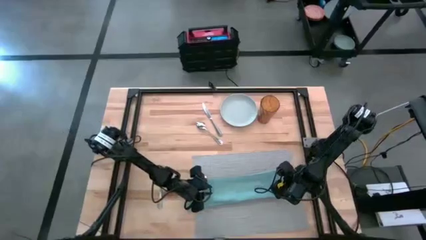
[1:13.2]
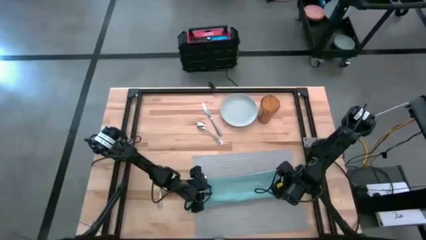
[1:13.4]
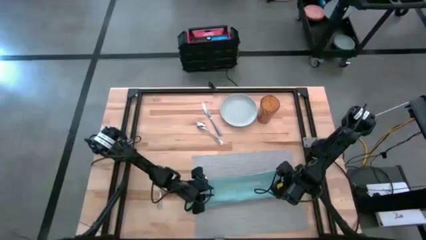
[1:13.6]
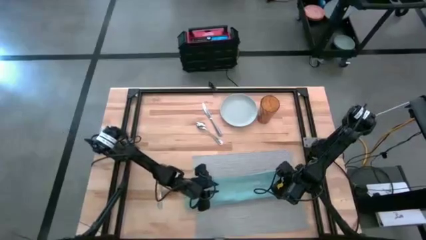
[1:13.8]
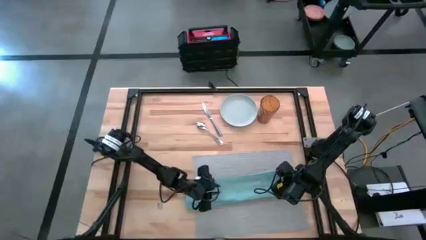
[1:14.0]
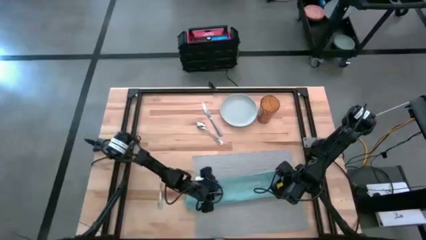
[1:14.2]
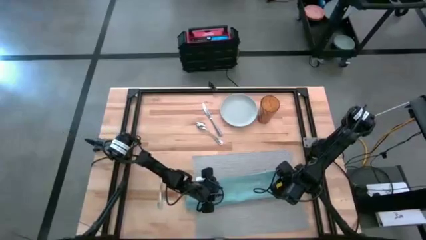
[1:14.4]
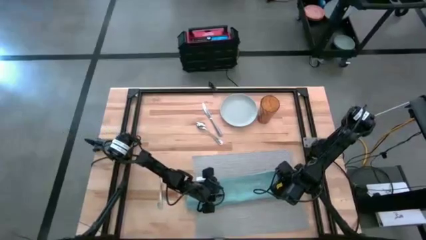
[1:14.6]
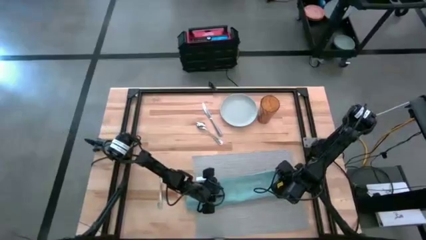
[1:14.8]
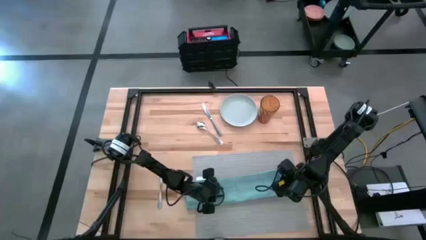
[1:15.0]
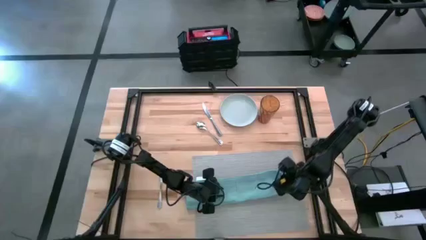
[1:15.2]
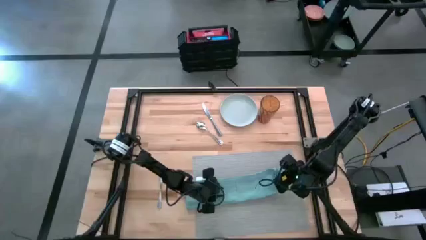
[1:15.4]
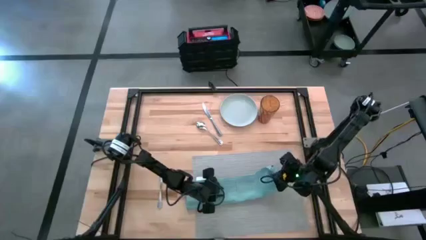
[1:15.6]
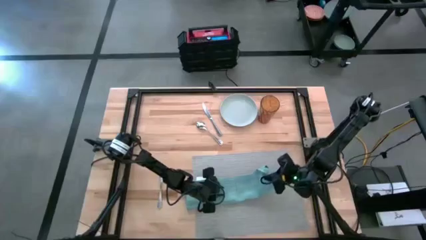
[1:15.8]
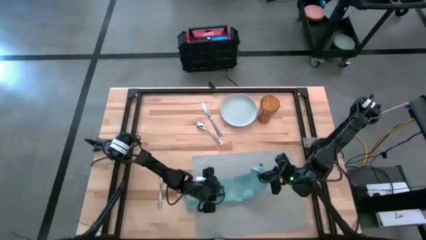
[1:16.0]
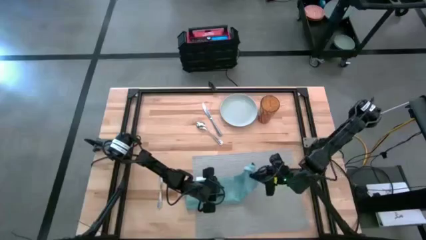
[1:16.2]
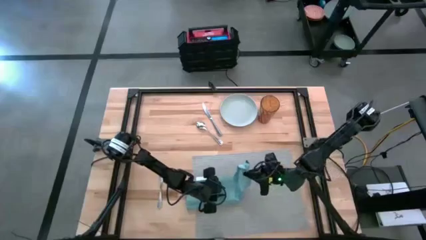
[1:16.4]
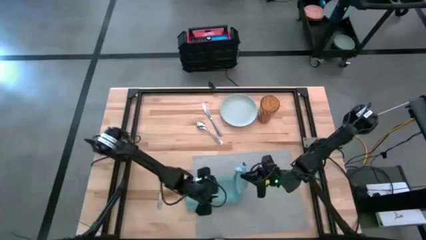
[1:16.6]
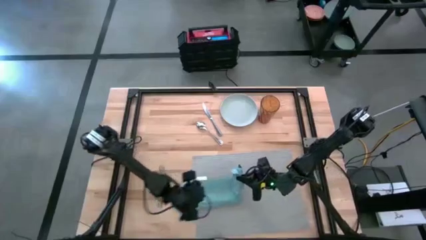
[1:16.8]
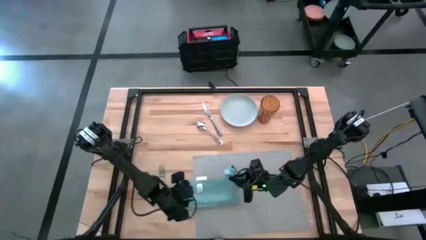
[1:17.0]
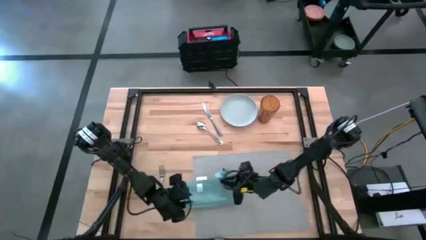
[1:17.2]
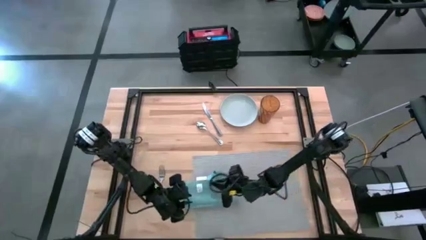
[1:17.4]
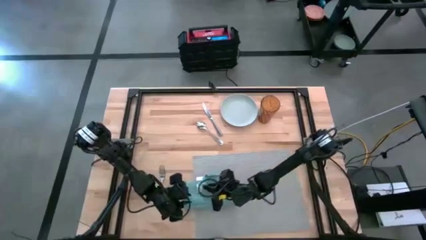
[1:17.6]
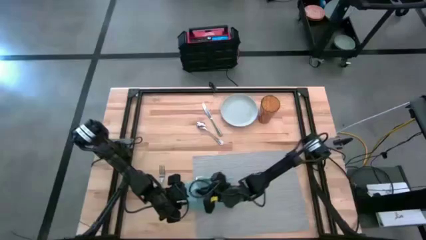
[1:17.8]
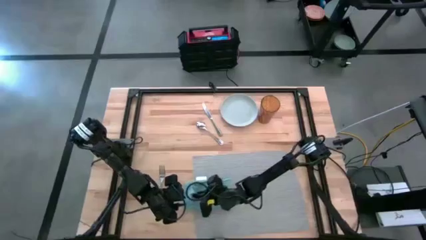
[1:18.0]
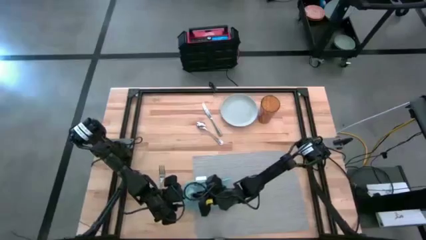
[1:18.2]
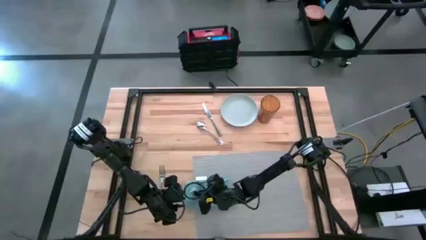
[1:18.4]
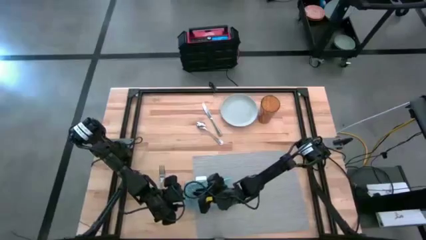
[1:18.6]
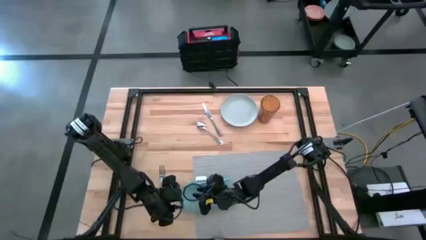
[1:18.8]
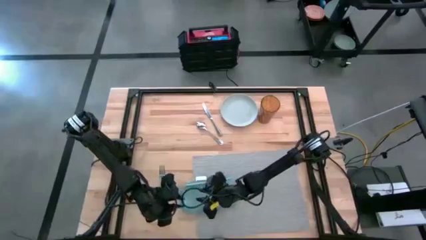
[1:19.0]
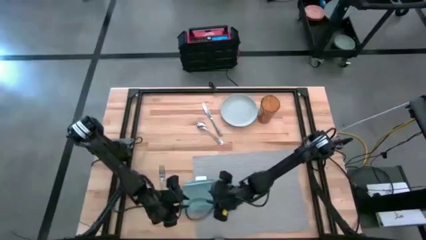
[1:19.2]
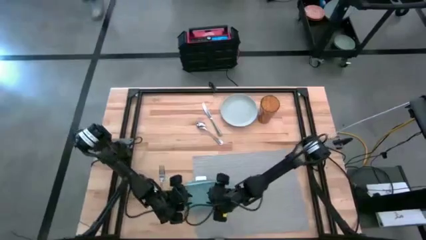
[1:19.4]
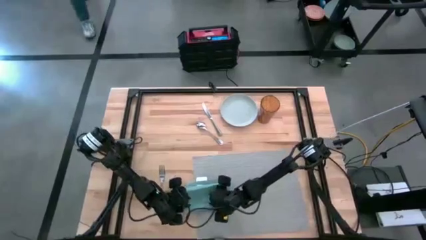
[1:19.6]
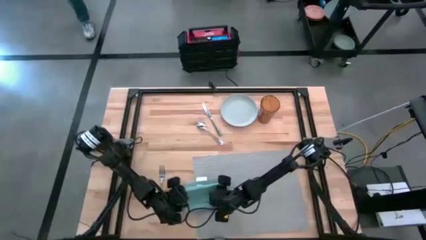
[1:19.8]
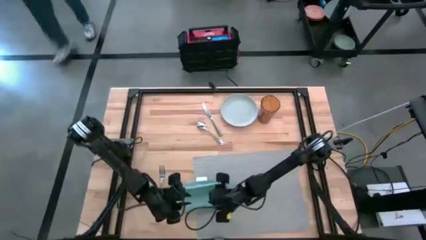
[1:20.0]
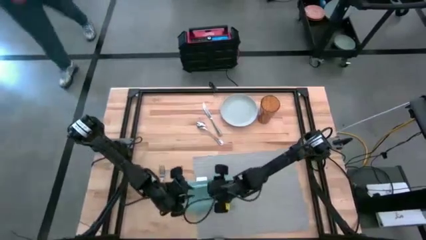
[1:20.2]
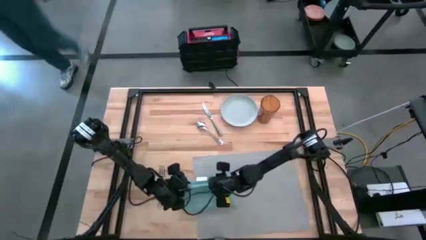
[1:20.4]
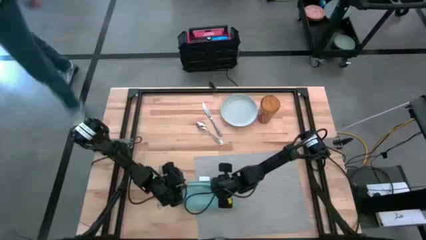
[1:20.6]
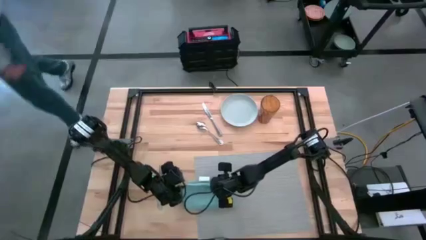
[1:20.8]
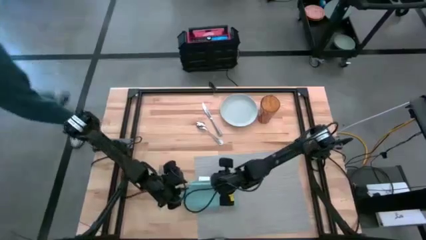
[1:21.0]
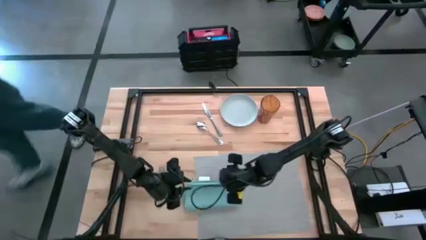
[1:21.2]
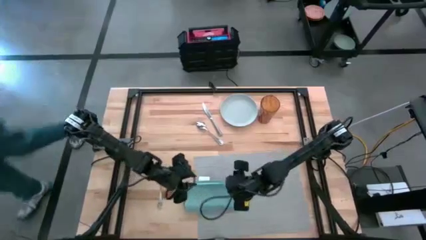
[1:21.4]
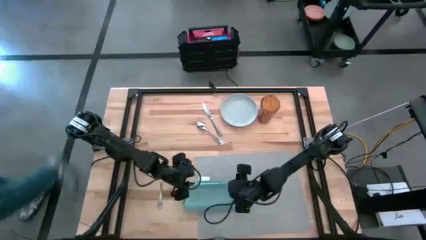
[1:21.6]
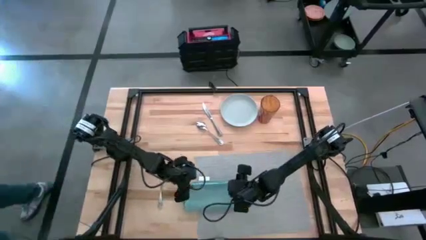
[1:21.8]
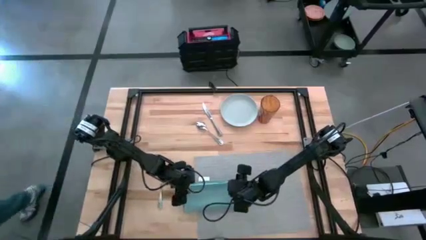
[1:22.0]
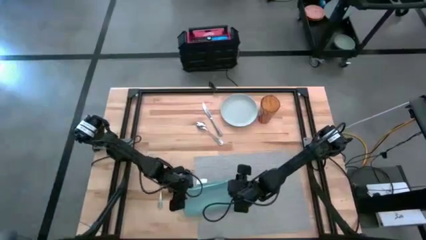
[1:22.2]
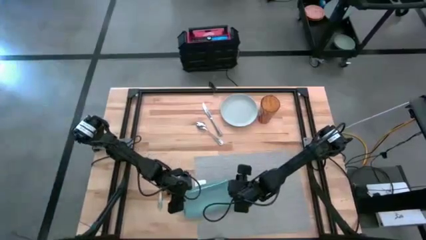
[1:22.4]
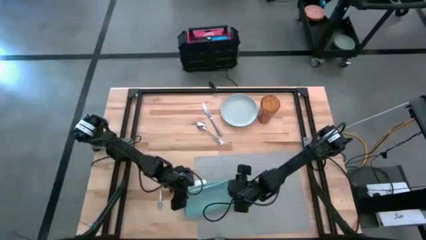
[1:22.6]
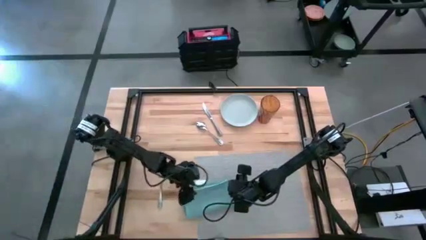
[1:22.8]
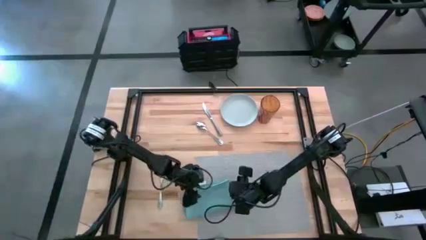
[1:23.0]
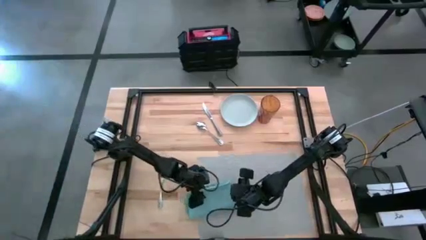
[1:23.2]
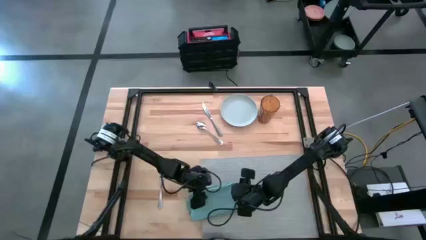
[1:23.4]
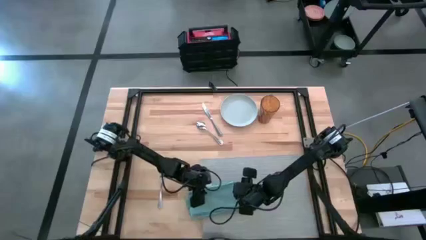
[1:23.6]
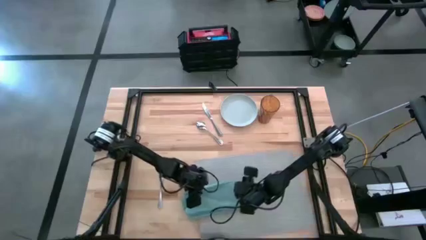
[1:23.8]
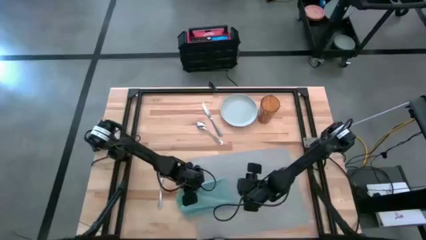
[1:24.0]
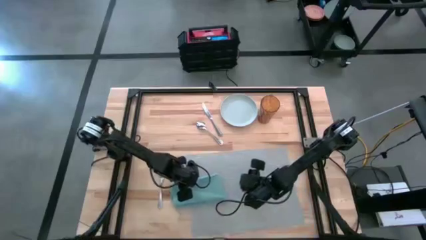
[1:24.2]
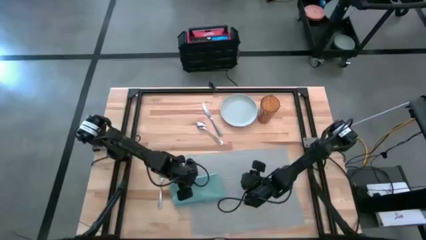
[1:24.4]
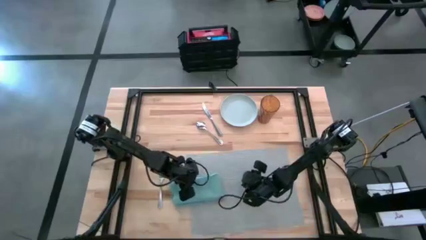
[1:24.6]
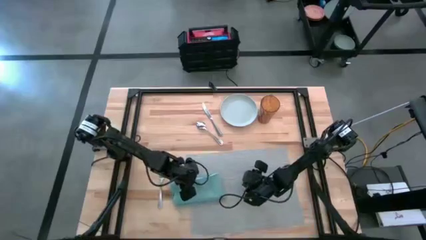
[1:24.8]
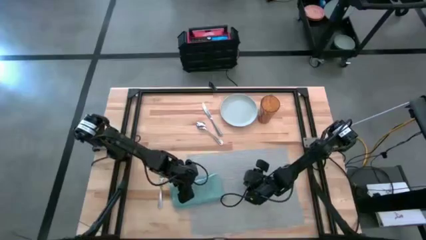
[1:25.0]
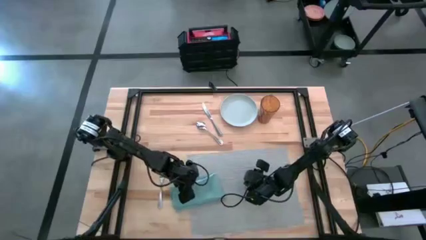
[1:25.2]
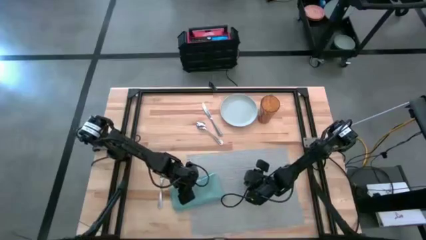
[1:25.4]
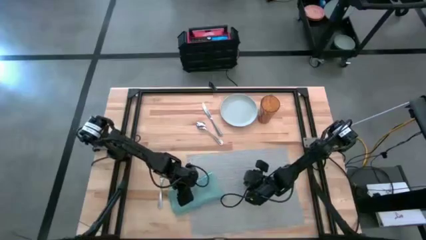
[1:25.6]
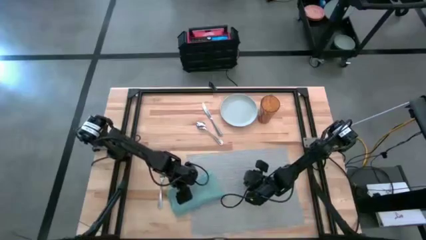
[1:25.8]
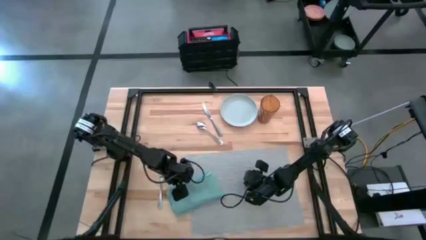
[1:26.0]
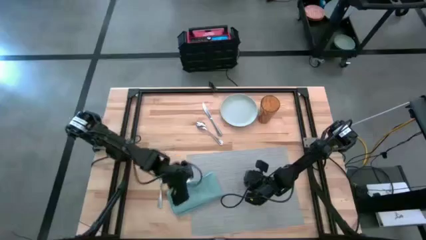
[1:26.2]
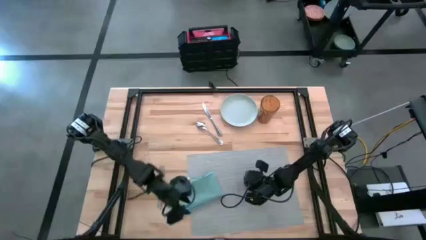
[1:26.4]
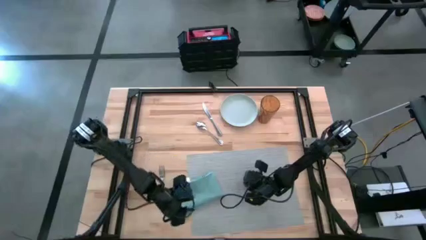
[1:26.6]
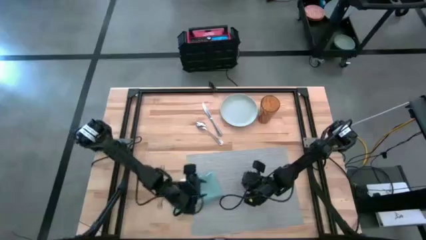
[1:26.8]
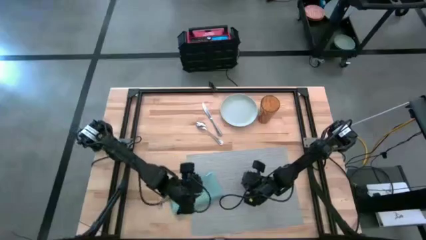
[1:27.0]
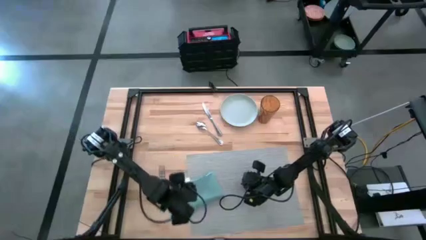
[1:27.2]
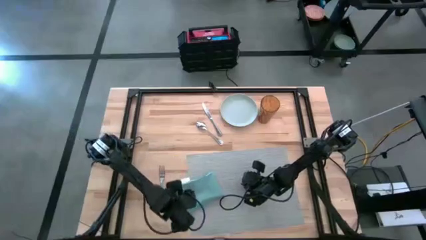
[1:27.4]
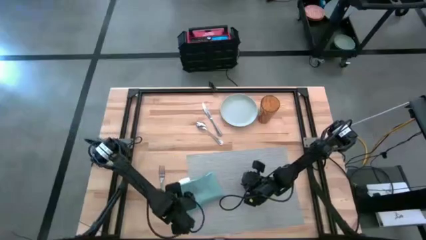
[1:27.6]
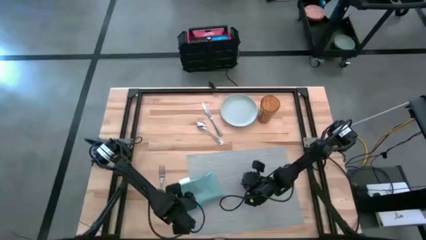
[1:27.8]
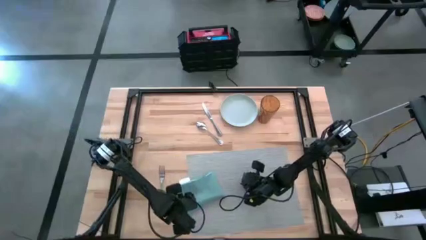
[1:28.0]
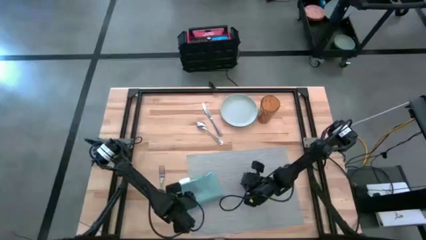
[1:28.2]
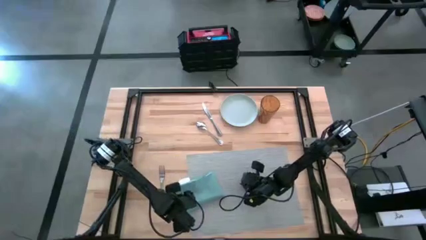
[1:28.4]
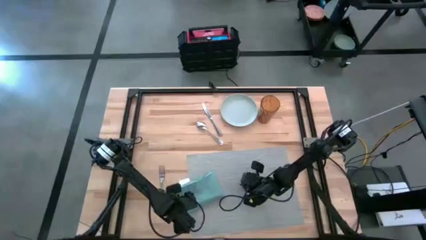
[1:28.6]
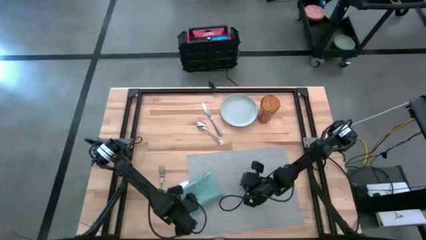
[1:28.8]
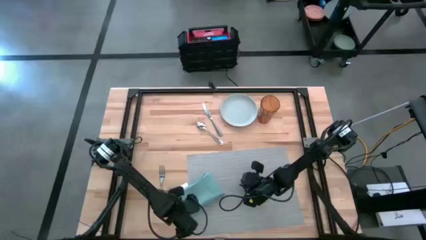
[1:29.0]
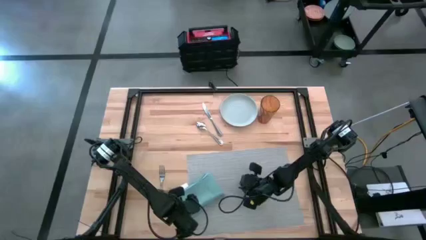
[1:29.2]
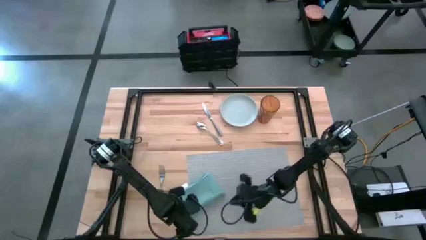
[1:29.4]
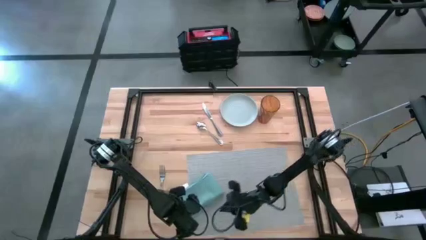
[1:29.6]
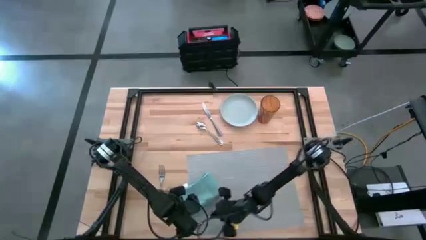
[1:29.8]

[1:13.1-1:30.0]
Task: Set table place
Fold the blue napkin on the gray placemat
